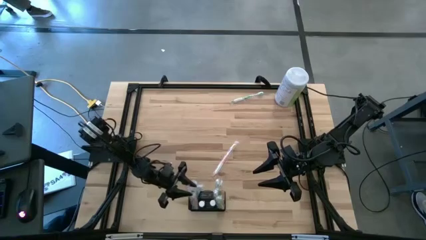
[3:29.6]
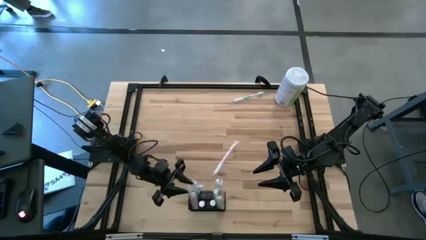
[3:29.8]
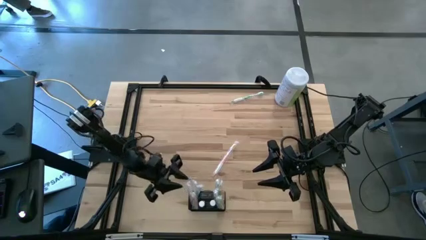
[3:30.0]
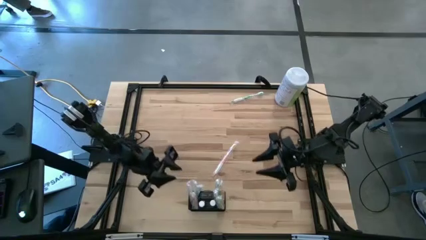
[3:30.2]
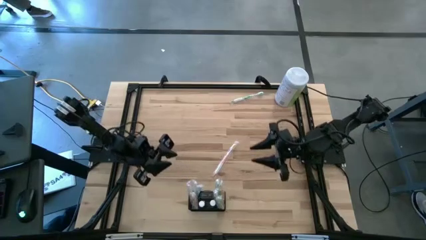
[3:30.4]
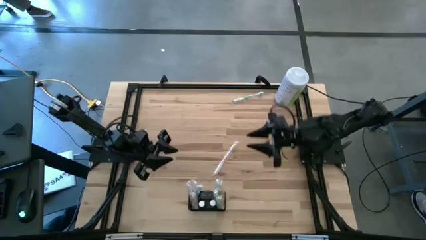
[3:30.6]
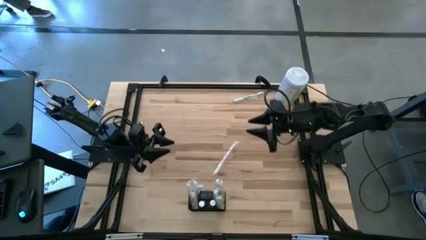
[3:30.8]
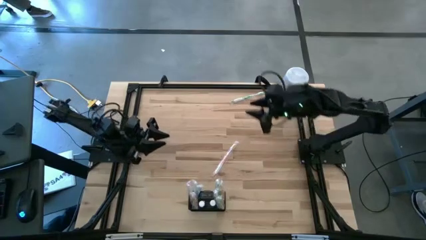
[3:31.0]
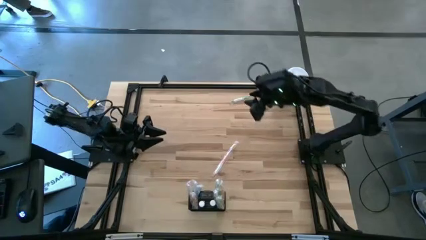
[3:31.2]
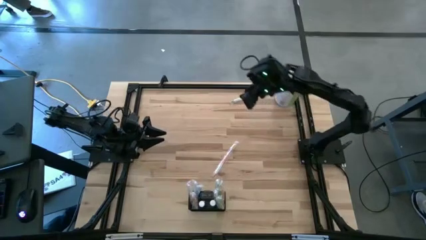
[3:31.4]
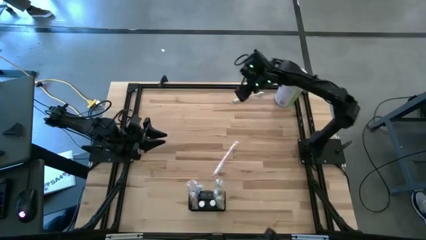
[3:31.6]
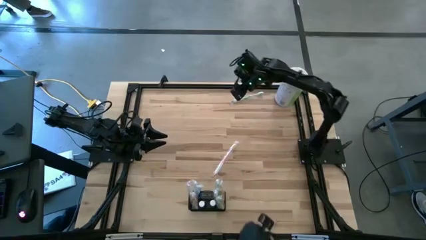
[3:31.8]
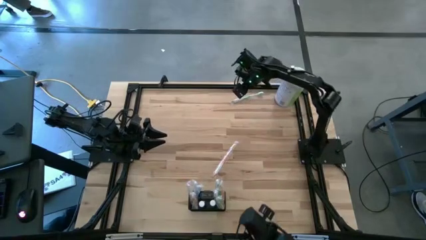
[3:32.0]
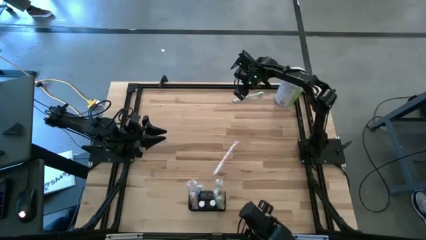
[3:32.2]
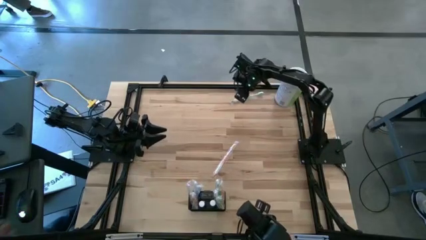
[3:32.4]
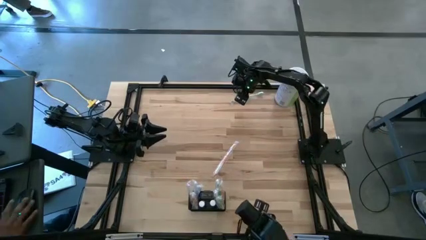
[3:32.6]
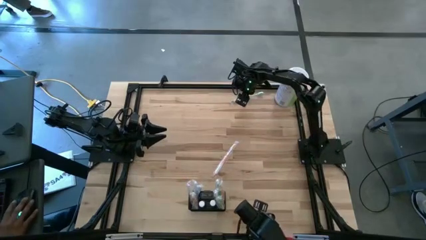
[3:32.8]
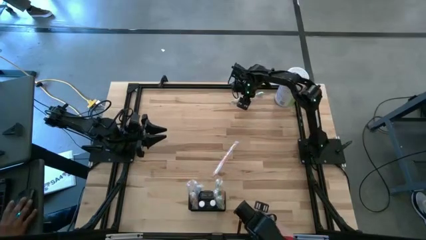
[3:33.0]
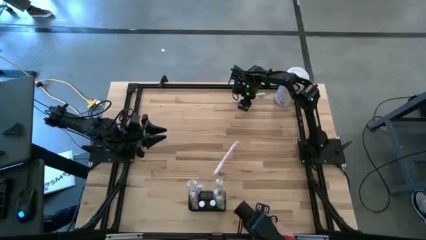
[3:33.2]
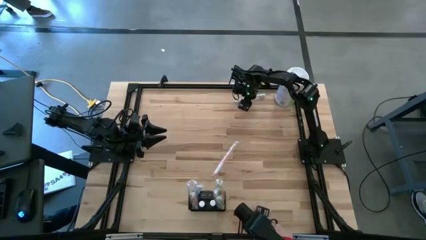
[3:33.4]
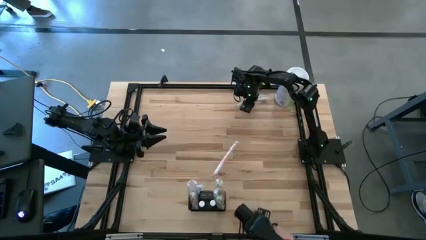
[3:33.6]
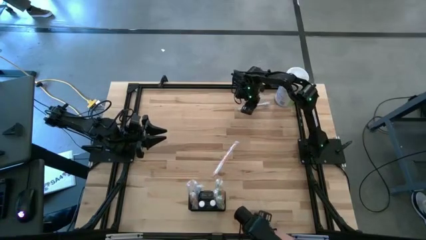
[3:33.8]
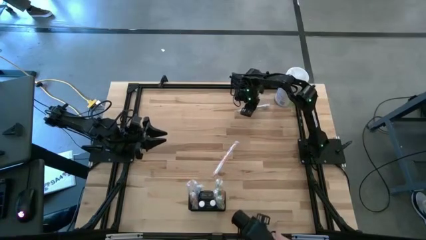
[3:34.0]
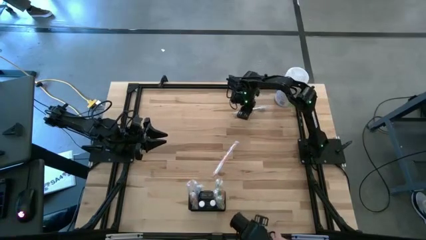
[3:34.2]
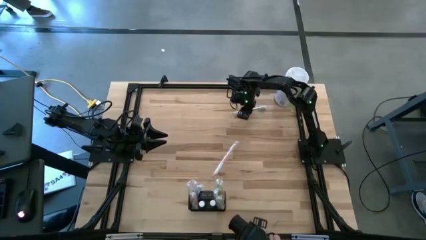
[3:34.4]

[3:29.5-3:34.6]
Task: Pick & Place toothbrushing station
Put the green toothbrush into the black wire organizer

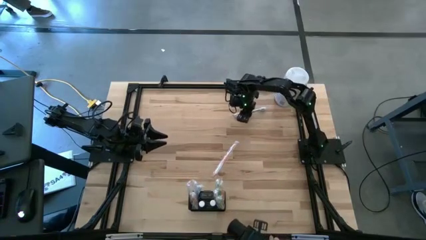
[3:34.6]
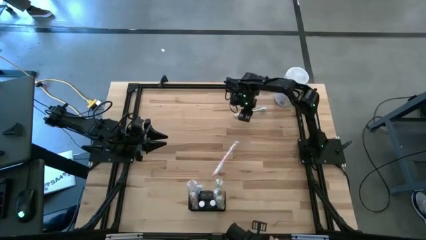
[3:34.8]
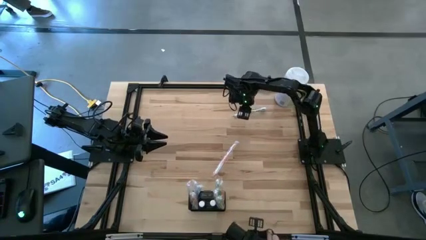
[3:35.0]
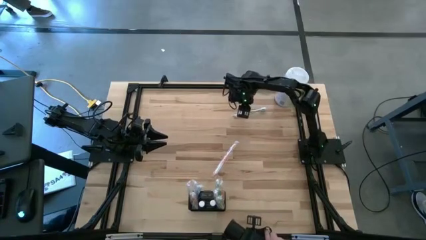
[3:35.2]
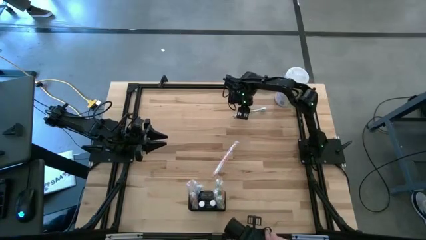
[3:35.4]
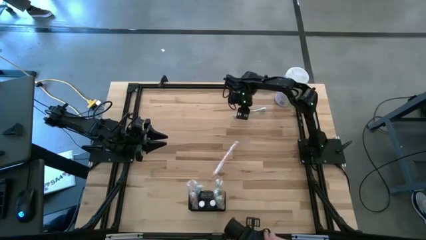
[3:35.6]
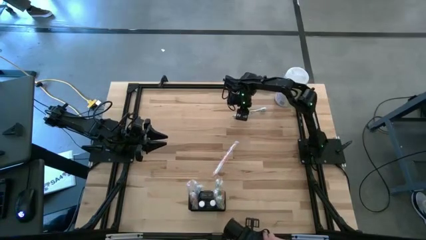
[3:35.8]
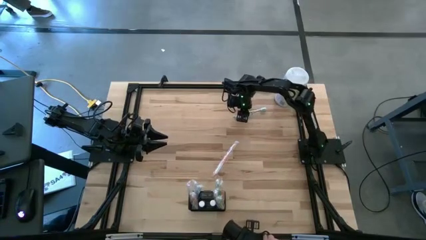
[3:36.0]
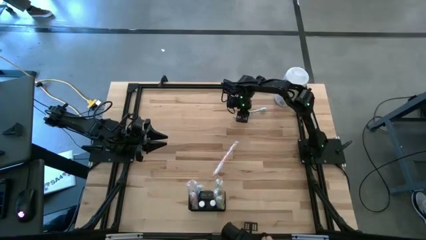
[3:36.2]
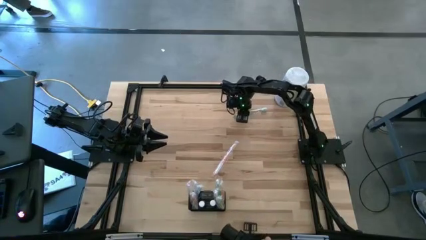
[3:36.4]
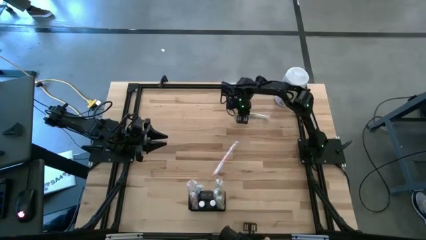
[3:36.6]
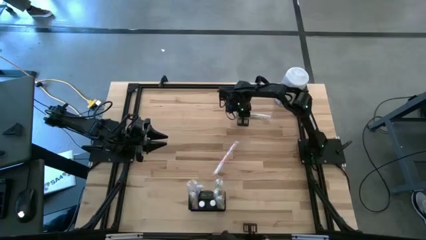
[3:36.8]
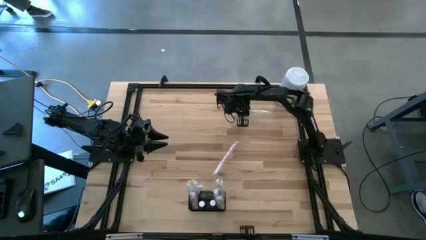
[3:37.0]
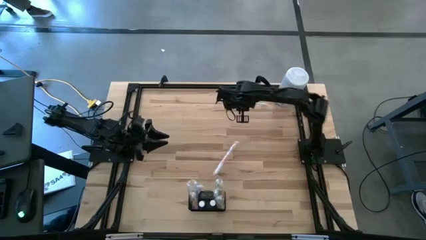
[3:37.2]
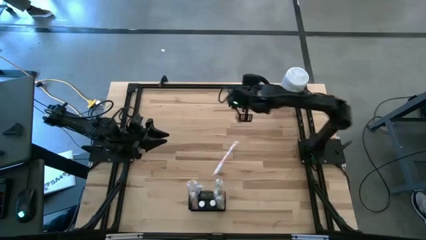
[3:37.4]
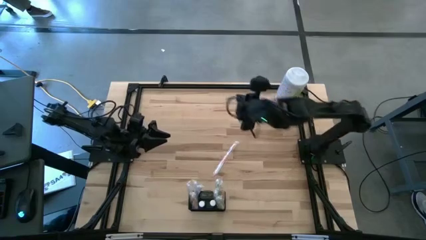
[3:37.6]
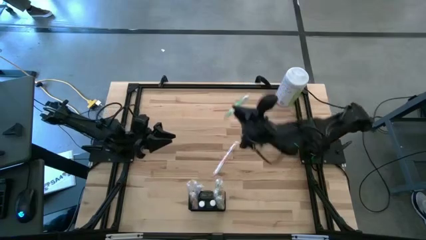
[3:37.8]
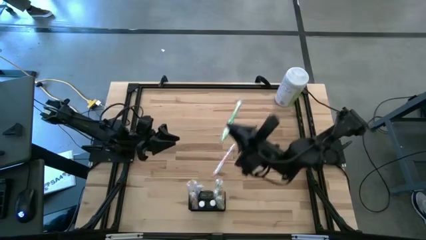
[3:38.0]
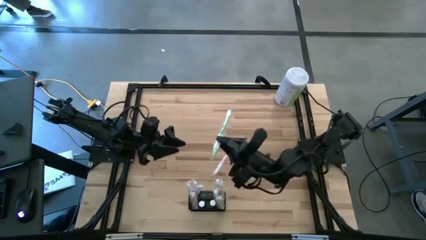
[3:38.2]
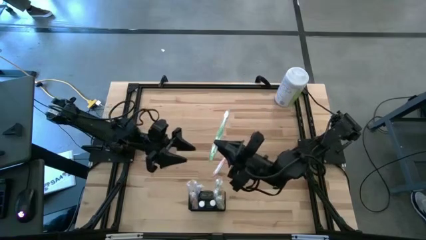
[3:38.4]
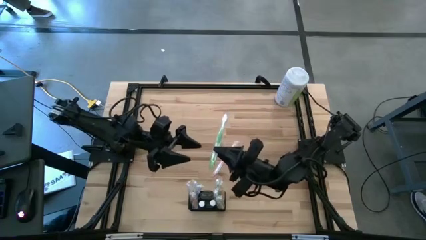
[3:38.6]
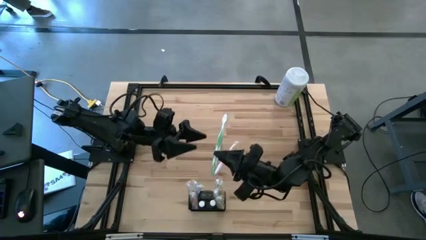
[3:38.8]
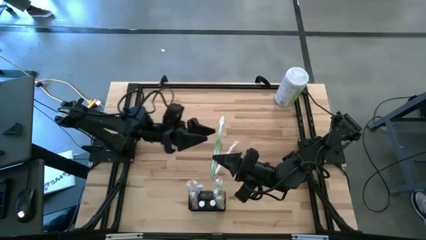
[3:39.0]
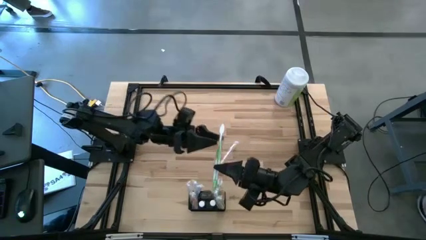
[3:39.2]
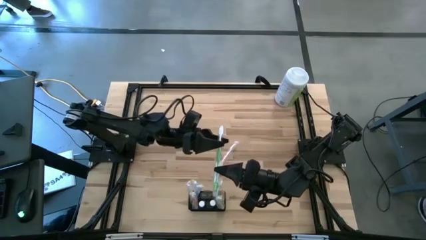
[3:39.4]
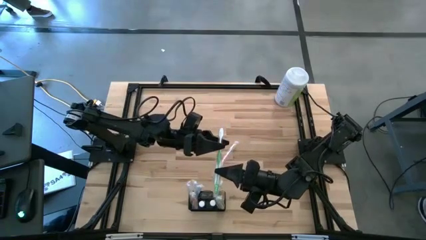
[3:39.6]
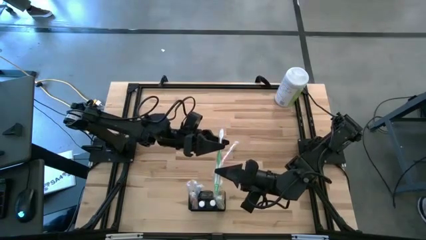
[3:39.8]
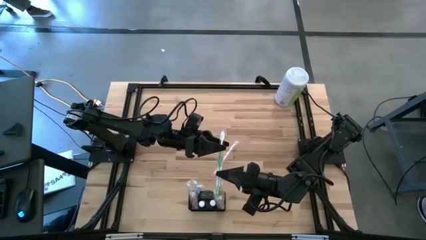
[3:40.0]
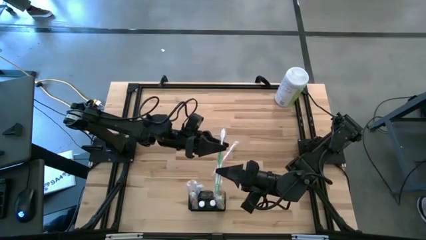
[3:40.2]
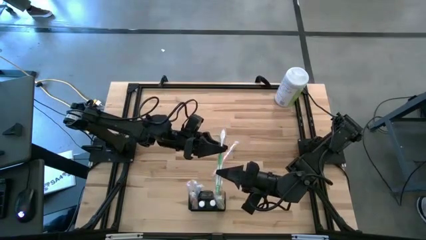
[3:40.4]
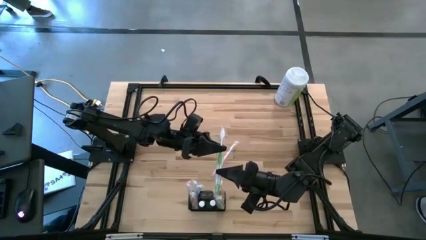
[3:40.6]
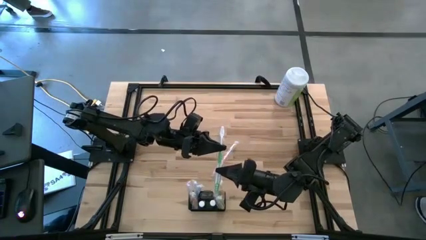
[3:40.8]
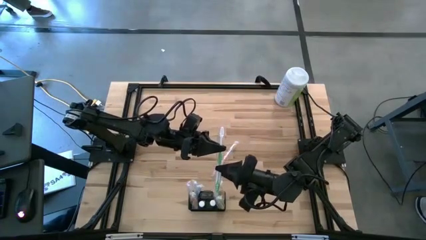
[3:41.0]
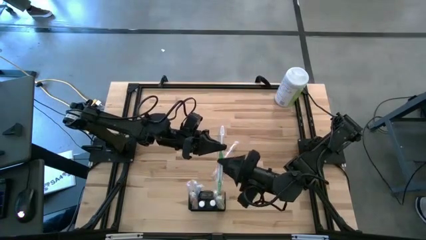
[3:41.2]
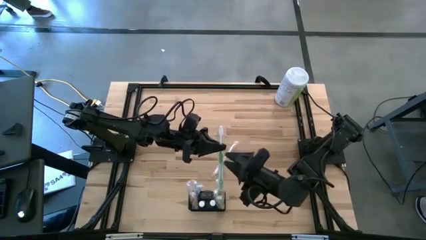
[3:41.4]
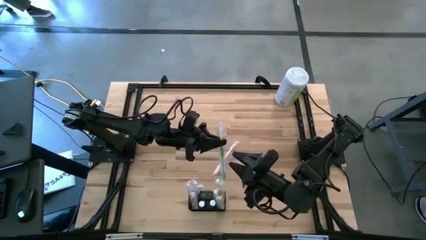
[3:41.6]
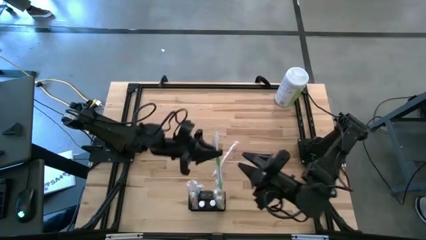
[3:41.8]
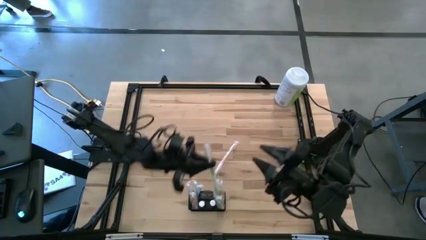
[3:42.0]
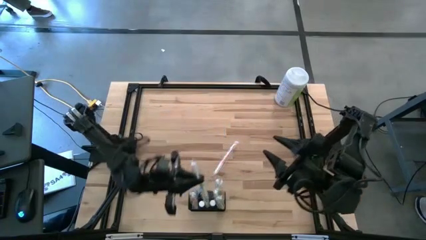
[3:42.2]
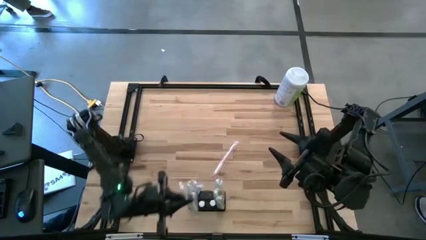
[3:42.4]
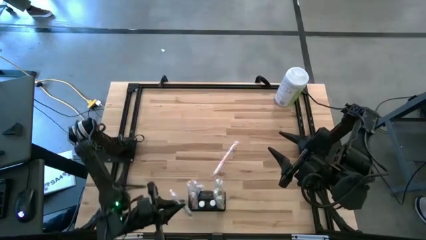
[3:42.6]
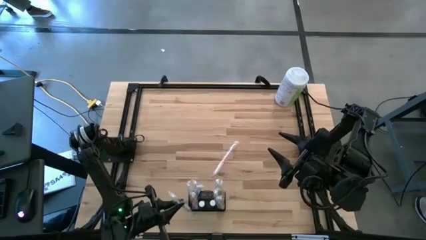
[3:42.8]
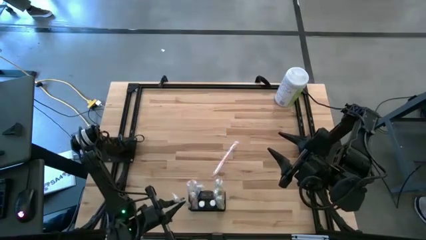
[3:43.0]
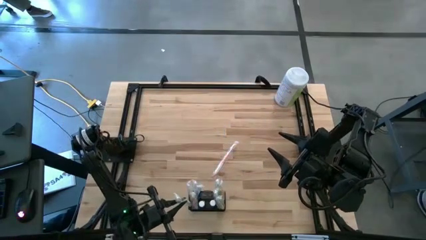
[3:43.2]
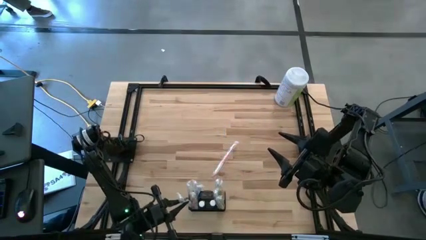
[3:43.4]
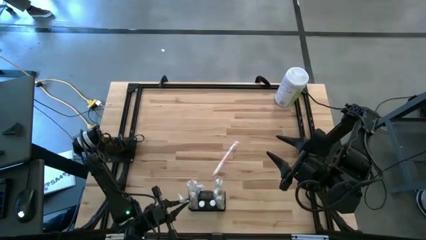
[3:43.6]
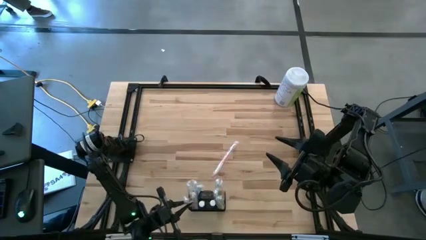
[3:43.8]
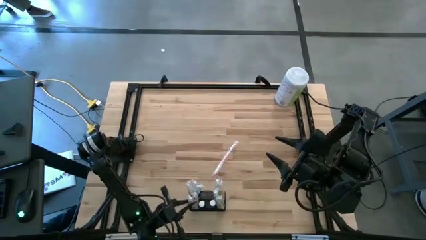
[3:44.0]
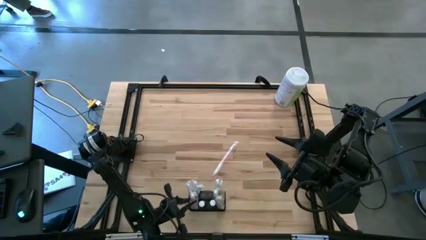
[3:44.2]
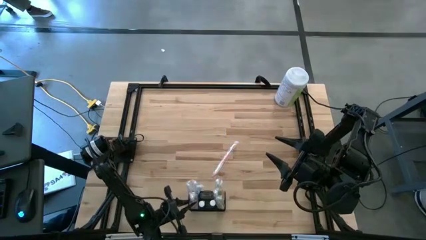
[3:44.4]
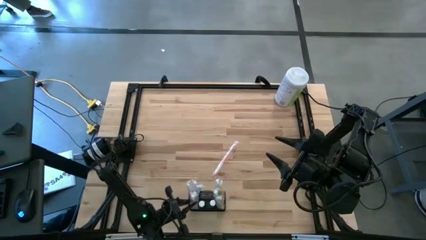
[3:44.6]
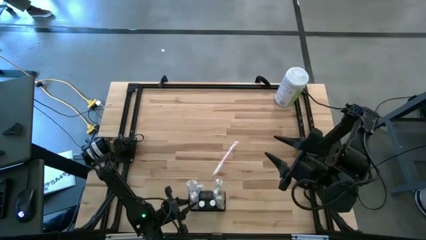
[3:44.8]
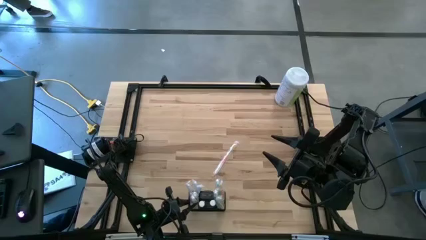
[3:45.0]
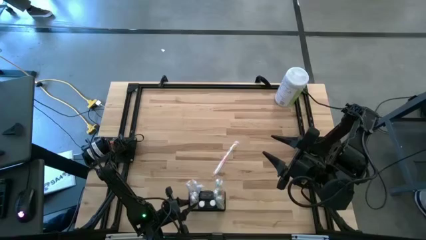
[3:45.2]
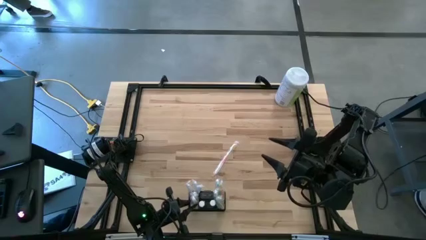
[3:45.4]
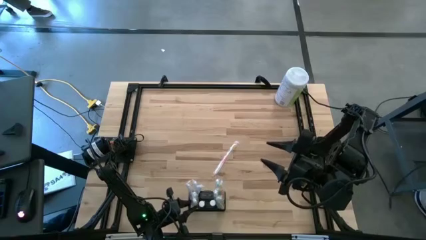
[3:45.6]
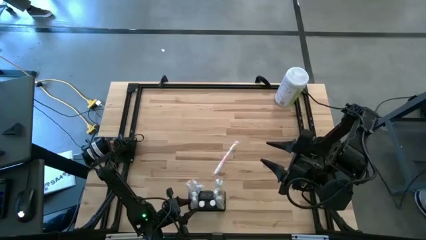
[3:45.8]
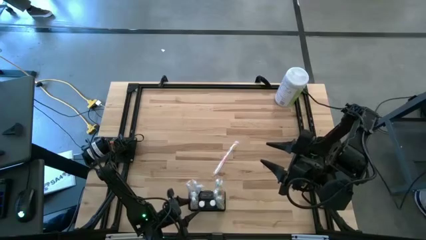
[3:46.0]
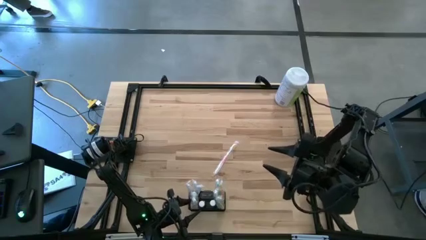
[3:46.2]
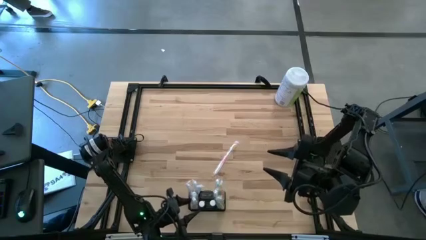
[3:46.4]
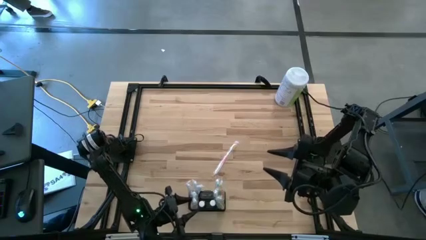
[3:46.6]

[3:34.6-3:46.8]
Put the green toothbrush into the black wire organizer
